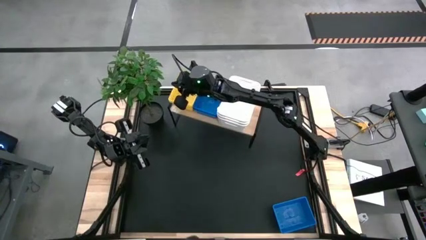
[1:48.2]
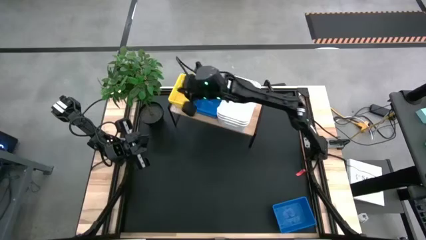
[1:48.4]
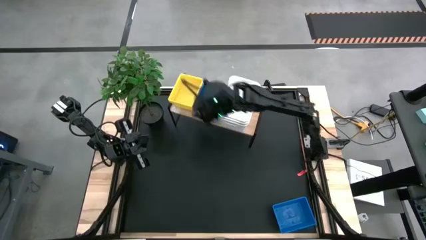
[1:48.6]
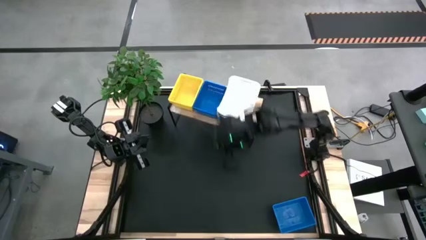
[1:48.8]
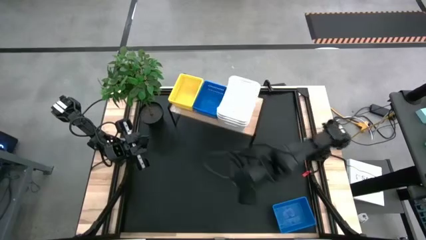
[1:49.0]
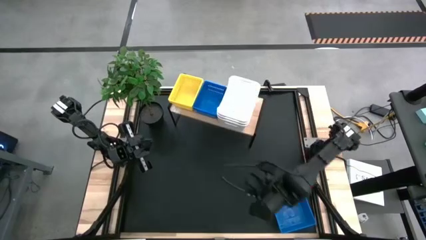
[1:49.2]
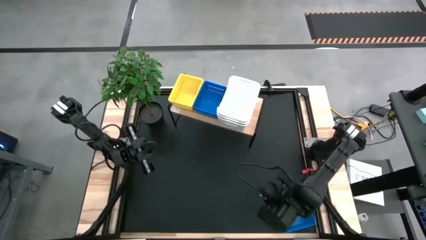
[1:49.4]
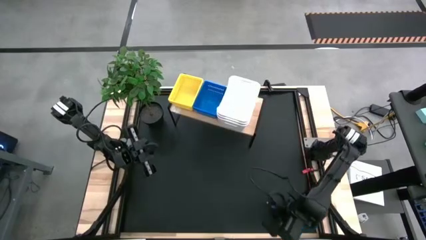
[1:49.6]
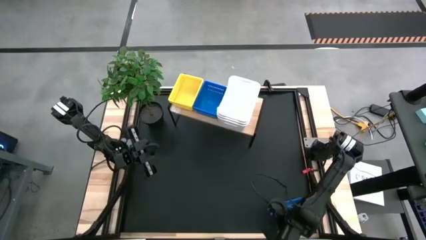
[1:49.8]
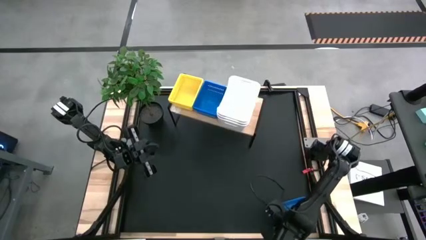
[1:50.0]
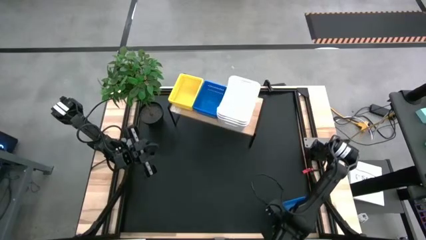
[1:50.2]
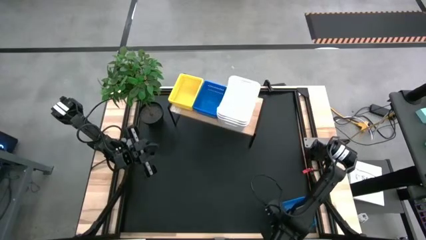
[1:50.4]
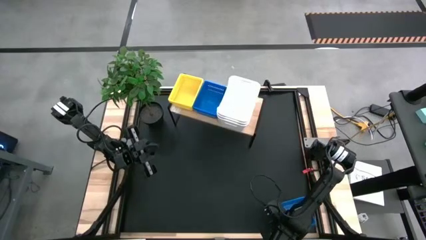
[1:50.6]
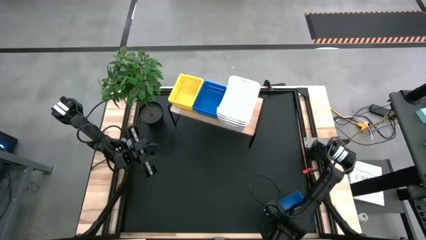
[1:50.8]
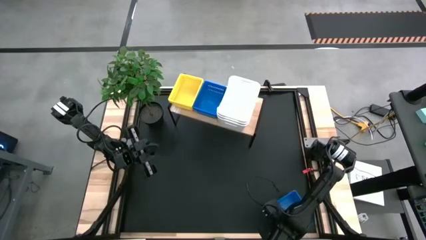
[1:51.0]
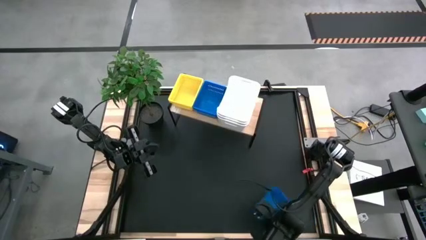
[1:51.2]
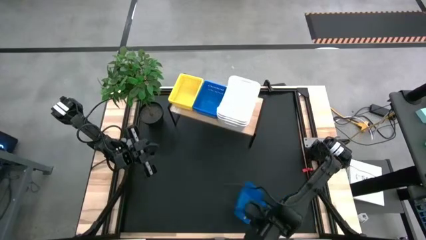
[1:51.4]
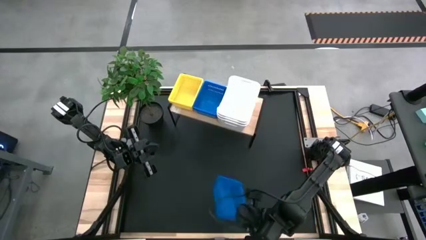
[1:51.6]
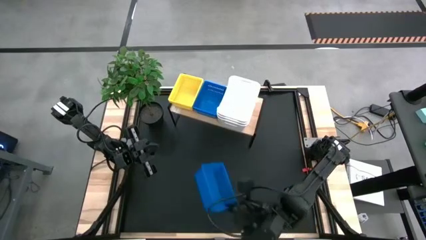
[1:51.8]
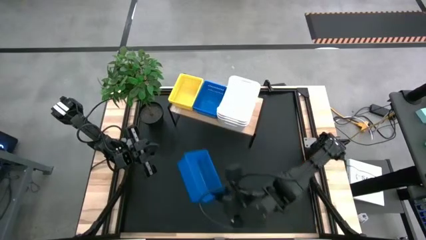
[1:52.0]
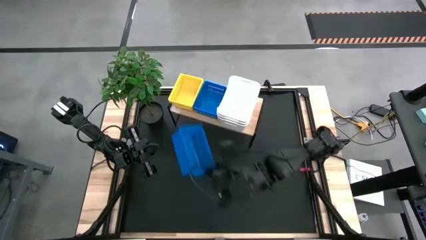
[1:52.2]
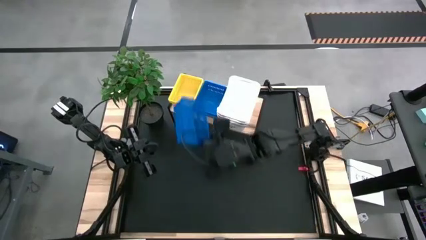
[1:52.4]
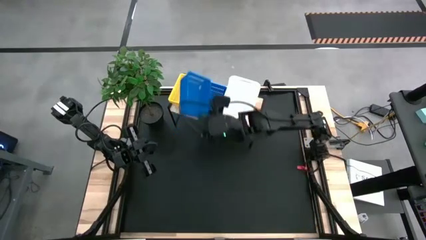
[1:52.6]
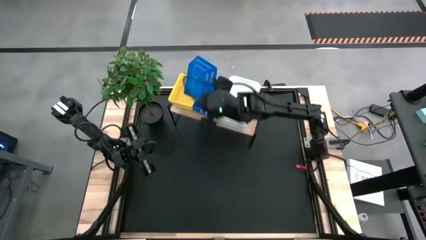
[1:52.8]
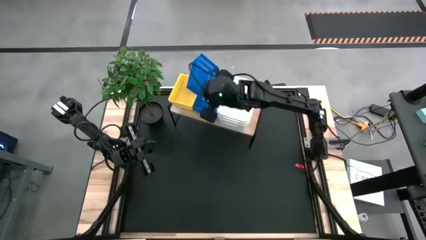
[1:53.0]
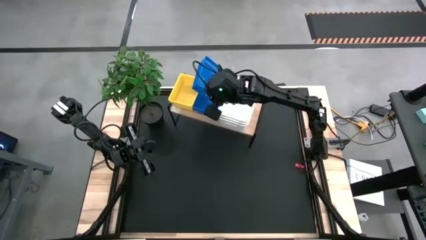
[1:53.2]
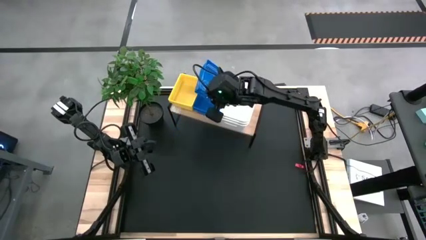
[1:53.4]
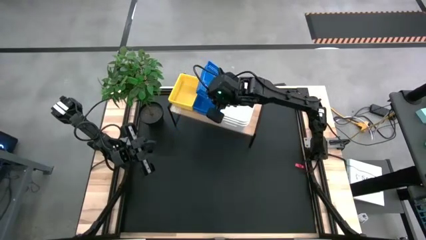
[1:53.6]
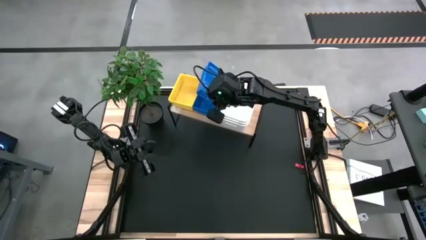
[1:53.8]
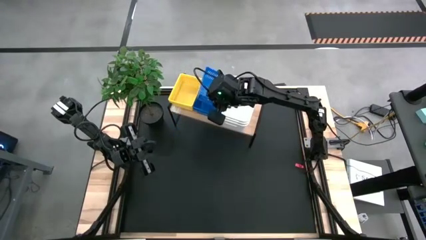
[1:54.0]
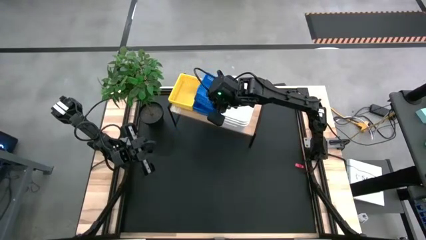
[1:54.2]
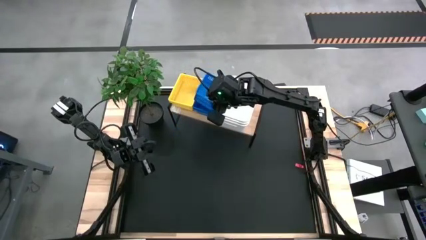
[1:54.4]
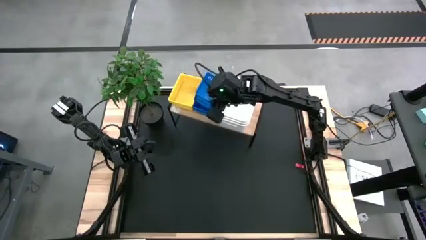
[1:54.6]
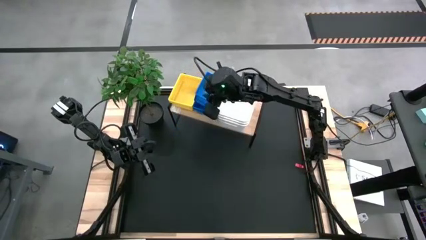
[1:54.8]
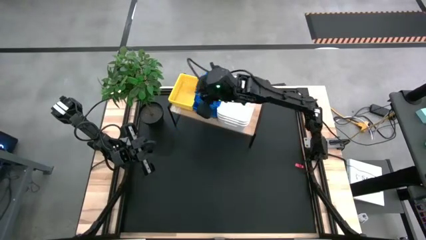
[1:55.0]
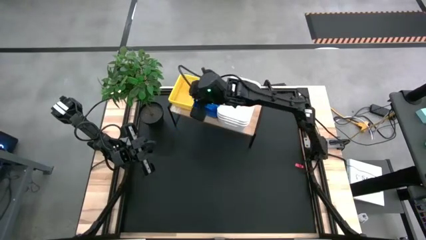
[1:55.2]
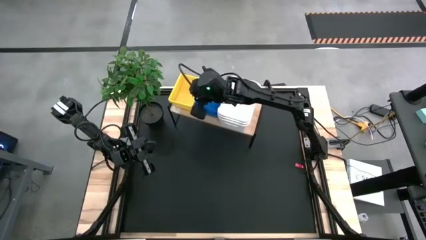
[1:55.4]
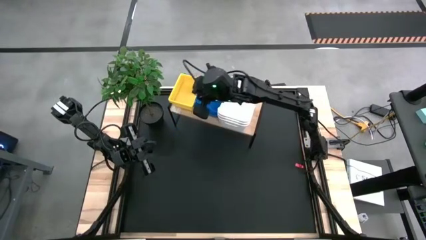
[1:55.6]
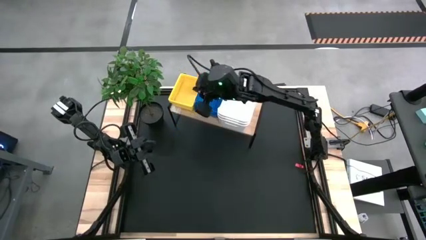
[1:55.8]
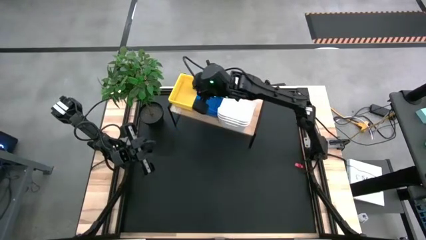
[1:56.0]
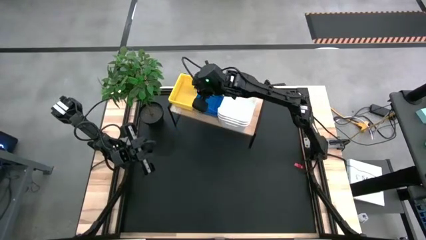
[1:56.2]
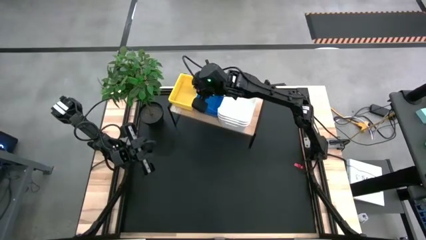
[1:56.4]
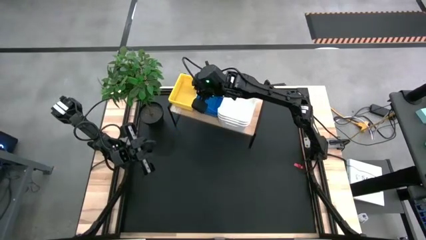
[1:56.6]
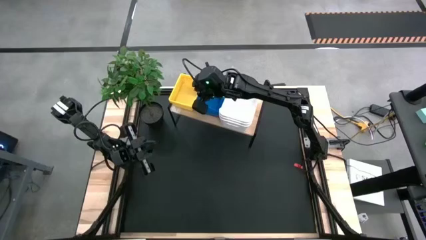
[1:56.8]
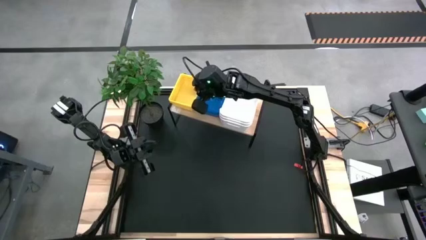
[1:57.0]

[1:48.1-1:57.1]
Task: Stack baskets on shelf by color
Stack the blue bin on top of the other blue bins on the shelf

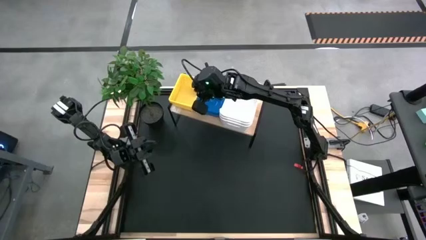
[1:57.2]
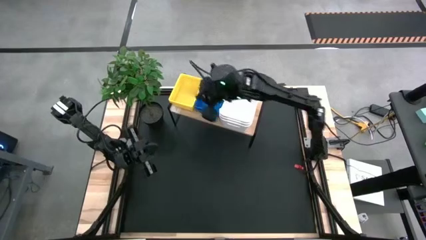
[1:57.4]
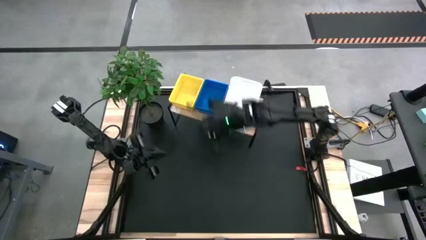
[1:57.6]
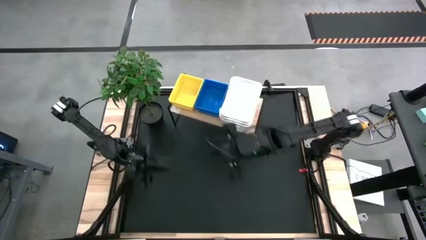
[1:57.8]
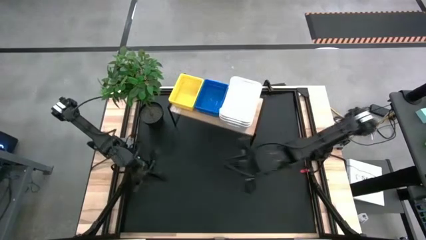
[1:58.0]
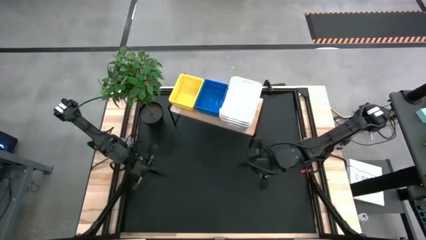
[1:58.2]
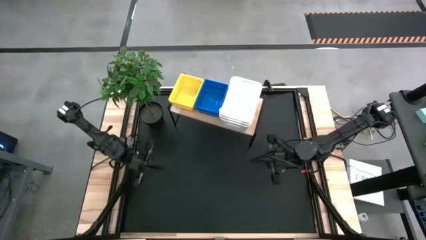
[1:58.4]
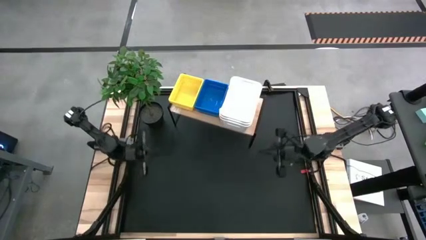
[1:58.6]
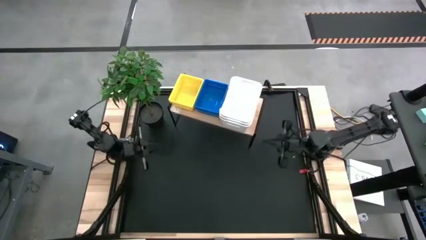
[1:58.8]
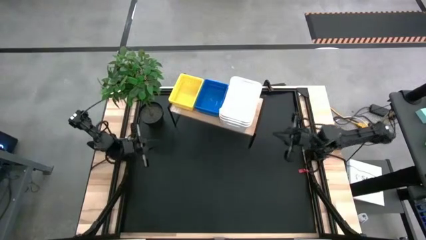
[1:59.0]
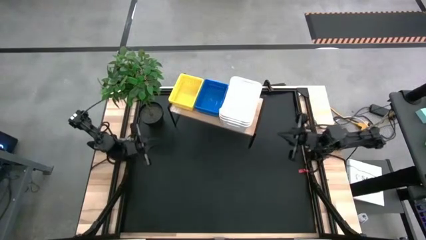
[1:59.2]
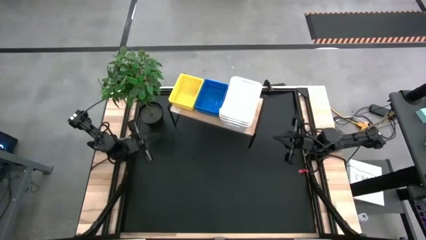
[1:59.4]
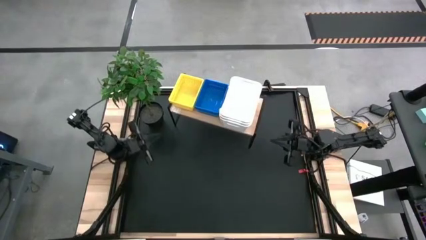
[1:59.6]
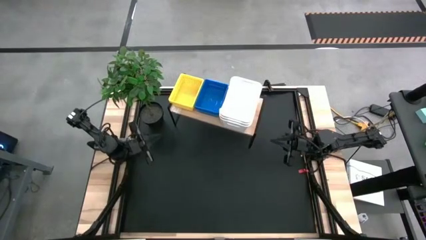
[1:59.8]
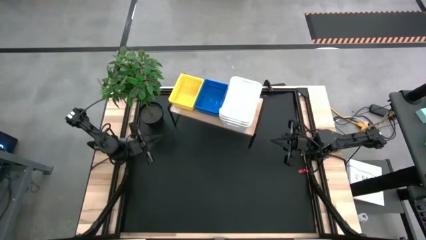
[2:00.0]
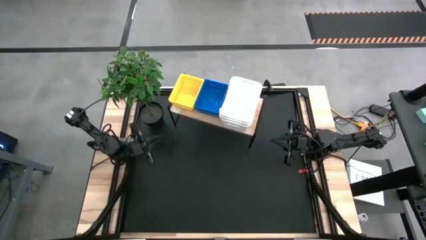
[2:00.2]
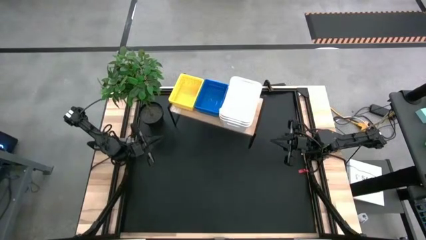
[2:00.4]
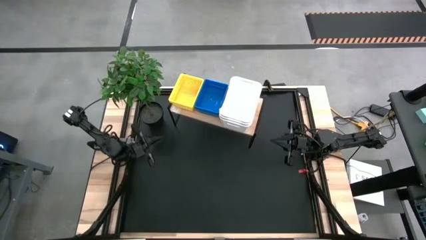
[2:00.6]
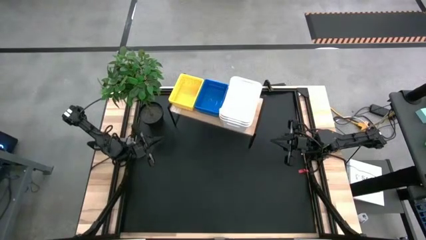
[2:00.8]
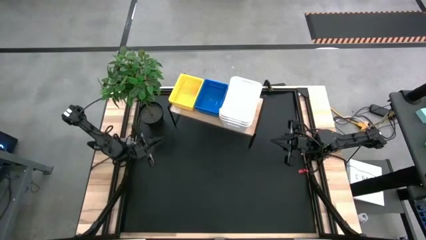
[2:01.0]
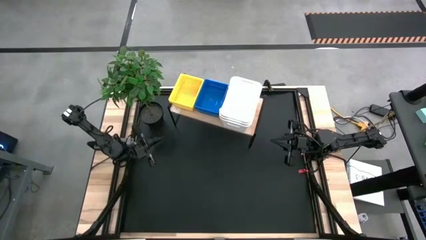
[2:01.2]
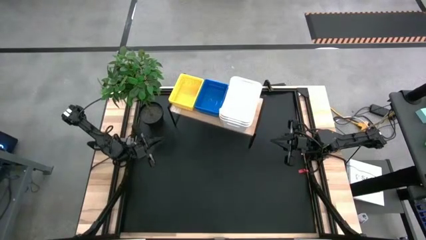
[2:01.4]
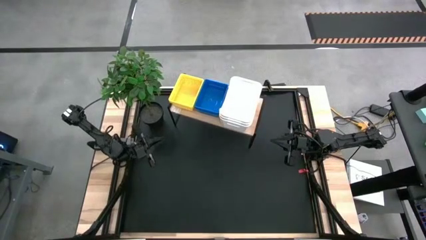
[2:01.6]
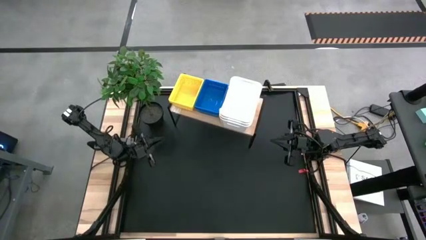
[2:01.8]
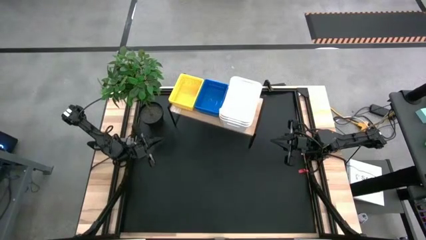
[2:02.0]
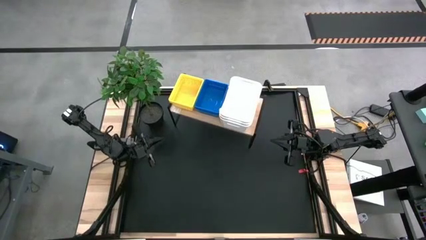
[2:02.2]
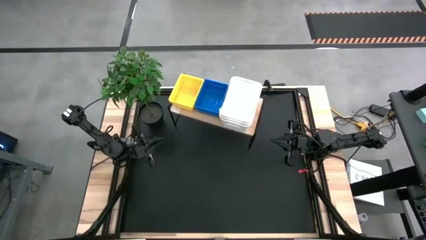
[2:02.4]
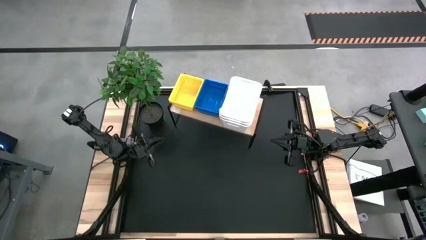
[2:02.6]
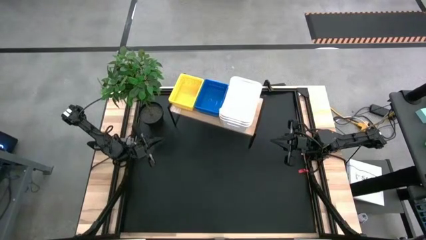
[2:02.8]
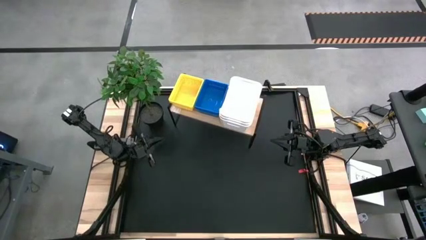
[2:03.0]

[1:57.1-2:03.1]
Return to Home Position
